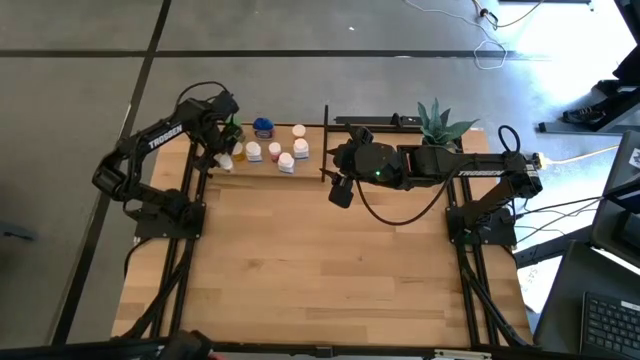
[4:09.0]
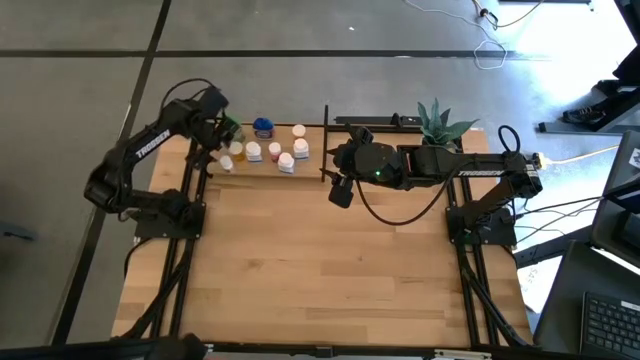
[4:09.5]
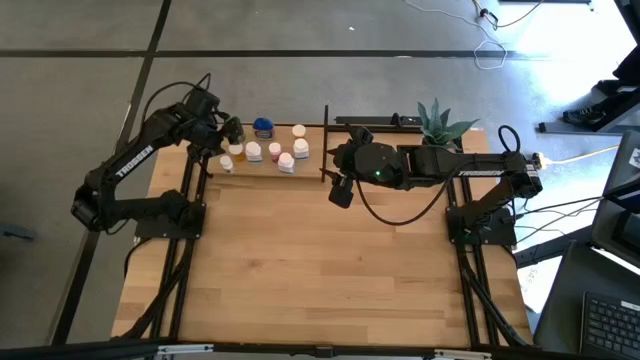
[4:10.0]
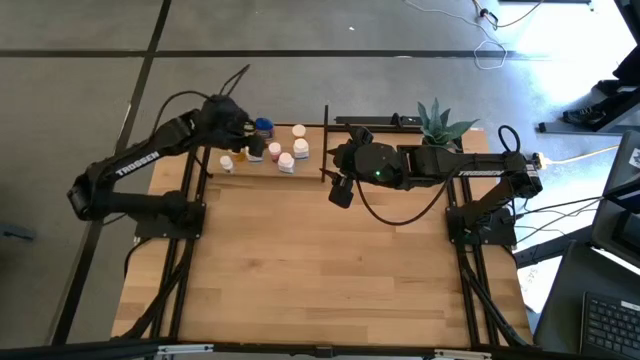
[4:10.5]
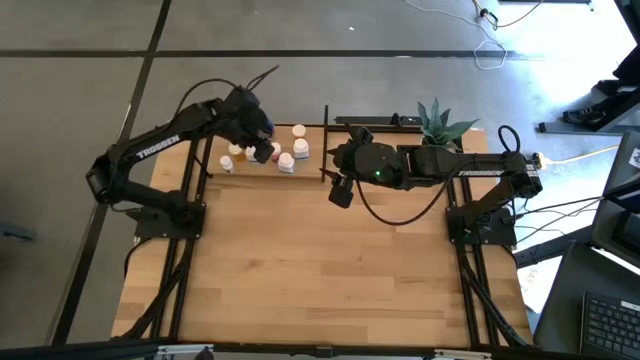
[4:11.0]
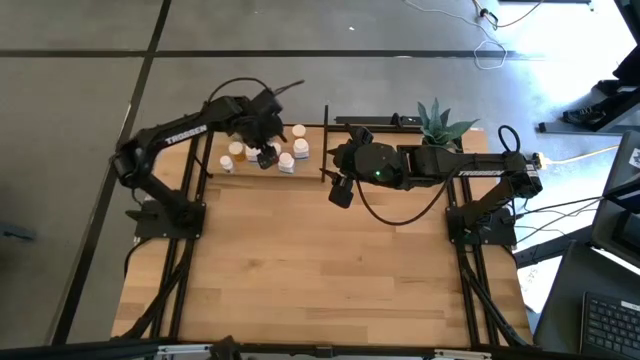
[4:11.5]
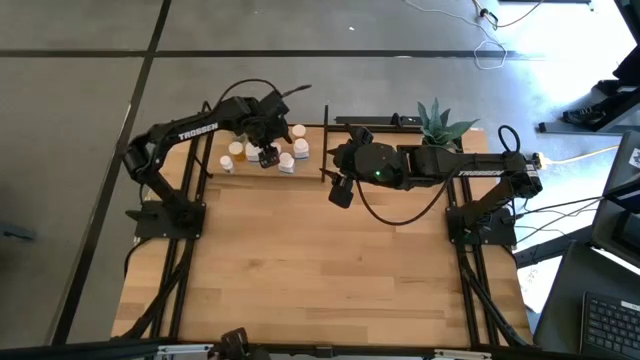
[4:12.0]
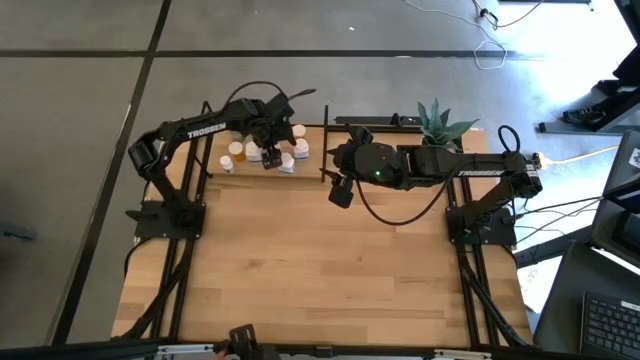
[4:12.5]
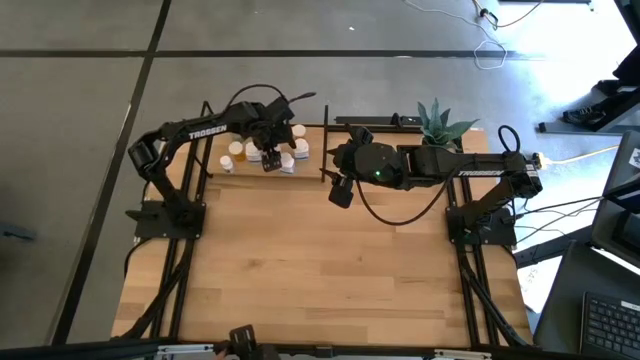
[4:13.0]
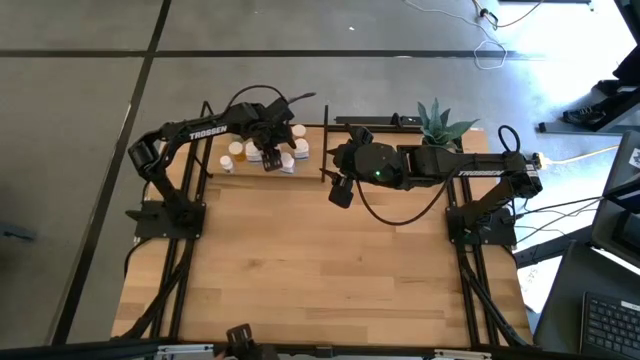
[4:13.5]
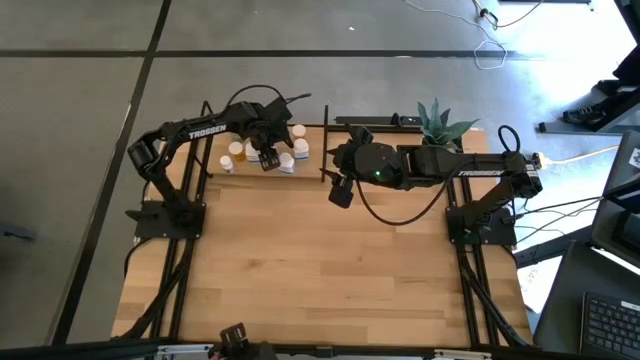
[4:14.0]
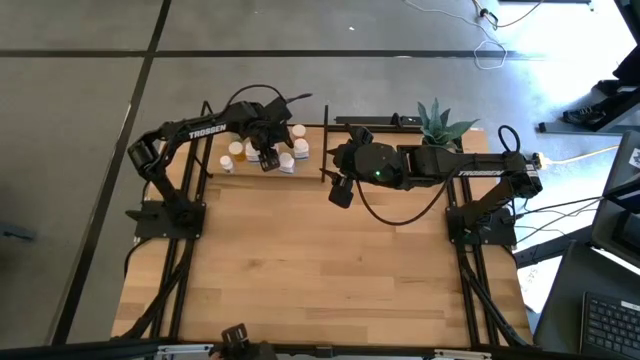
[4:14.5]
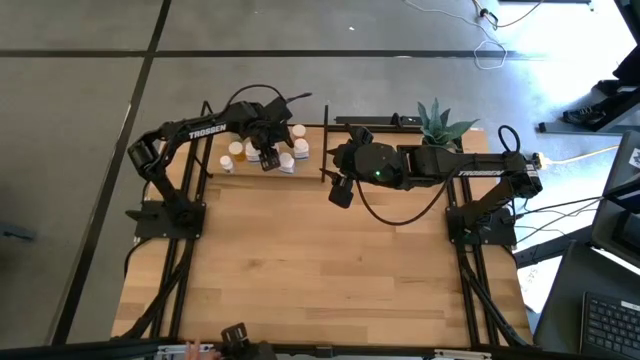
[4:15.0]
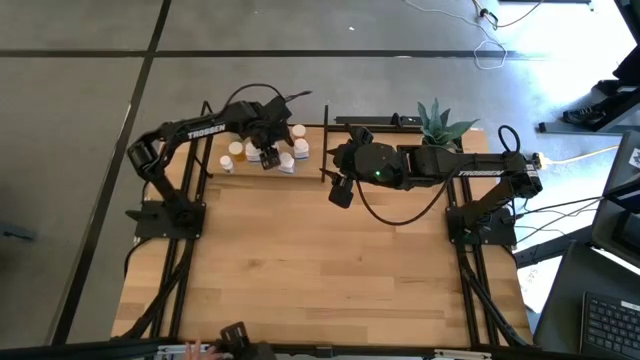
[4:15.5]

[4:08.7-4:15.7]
Task: Pick and place medicine bottles onto shelf by color
Adjust the pink pill bottle on the shelf

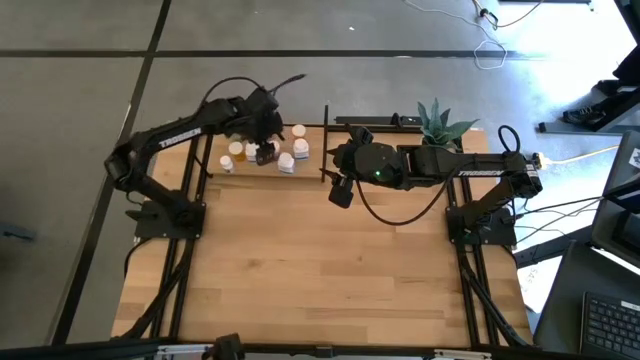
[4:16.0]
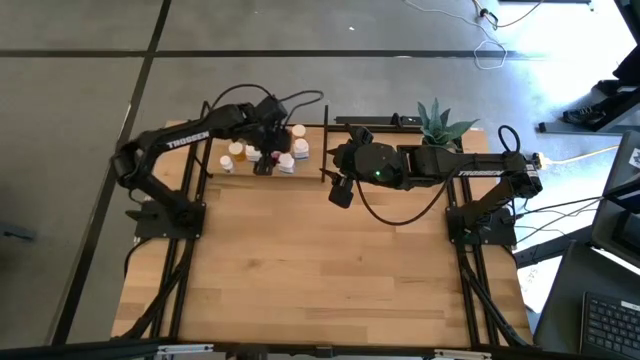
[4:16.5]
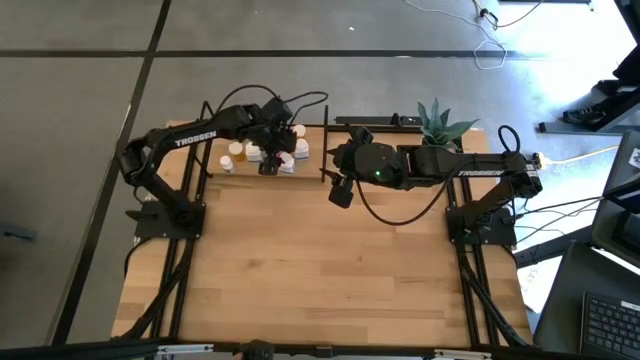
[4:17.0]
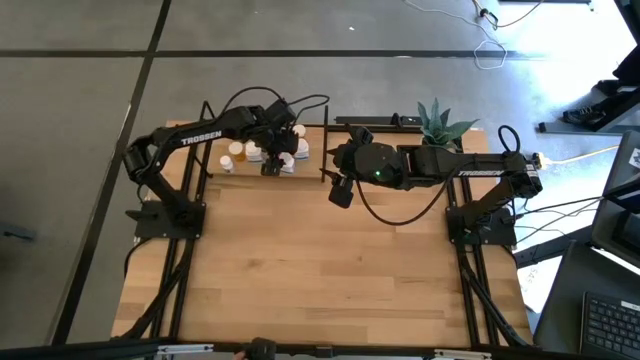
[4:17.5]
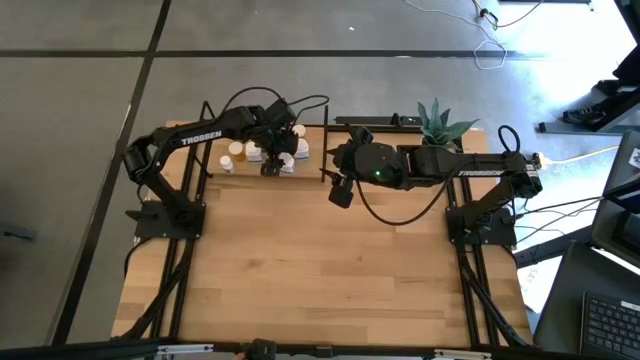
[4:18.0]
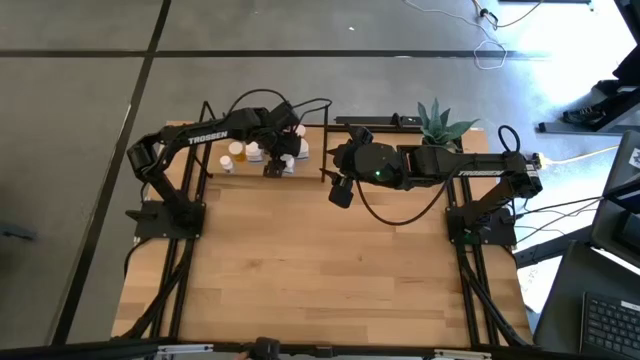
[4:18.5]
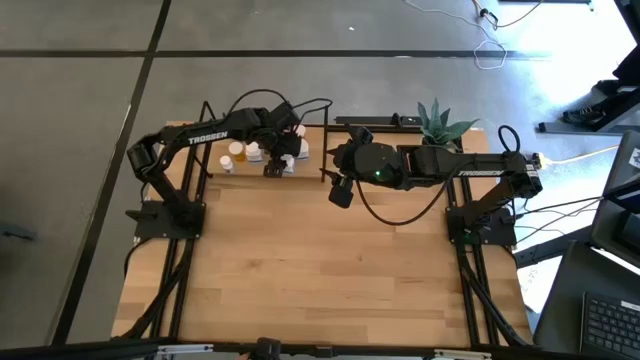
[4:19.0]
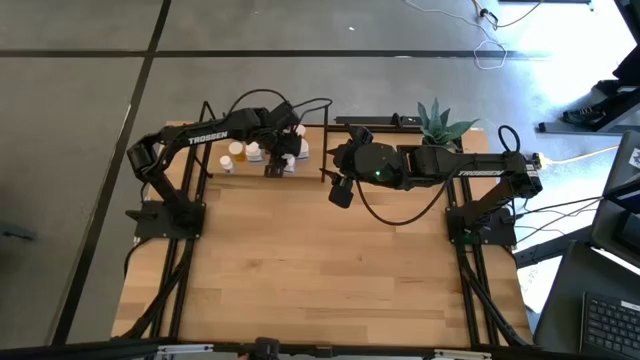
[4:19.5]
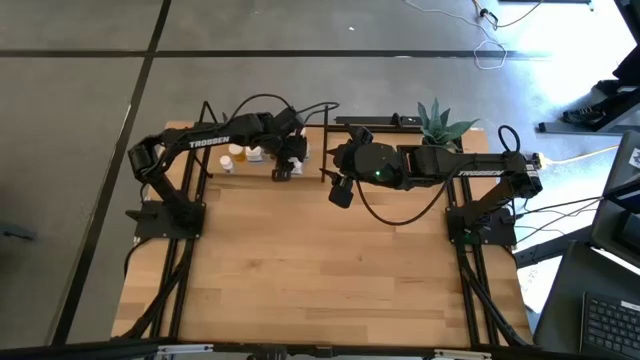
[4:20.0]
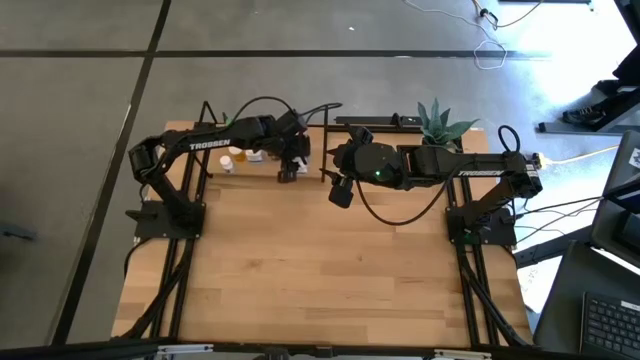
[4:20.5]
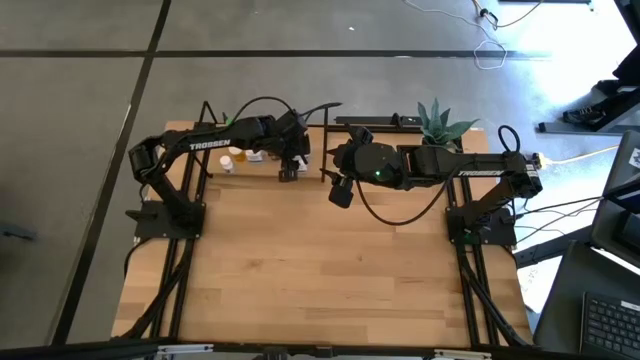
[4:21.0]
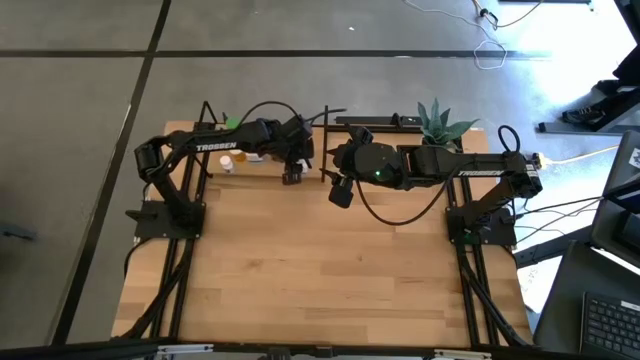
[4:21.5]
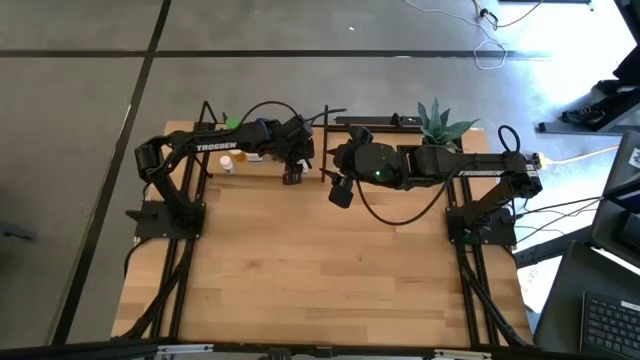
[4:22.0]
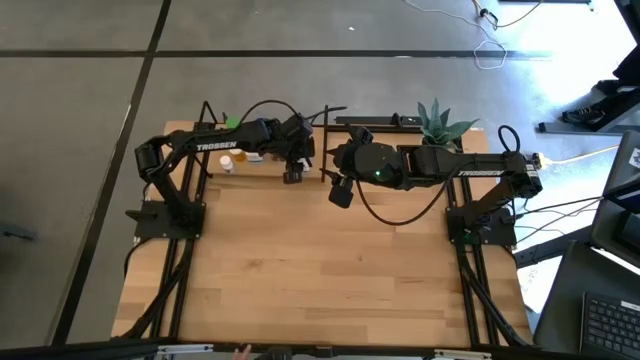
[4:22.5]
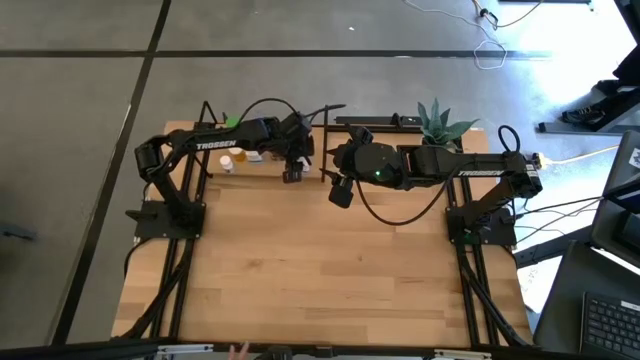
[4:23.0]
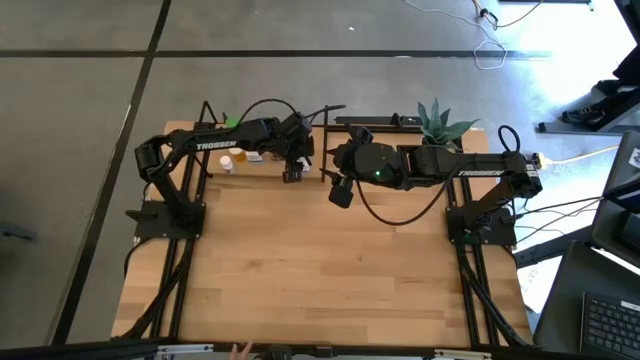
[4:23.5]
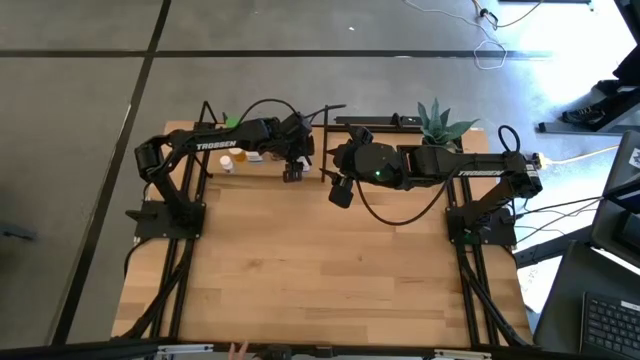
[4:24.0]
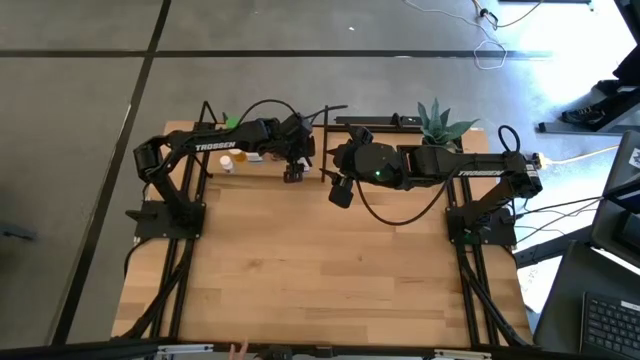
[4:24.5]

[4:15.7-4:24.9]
Adjust the white pill bottle on the shelf
